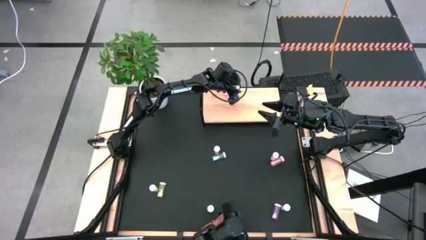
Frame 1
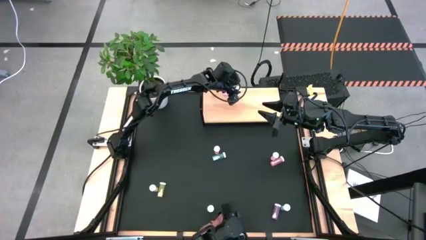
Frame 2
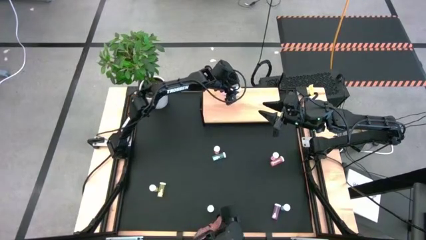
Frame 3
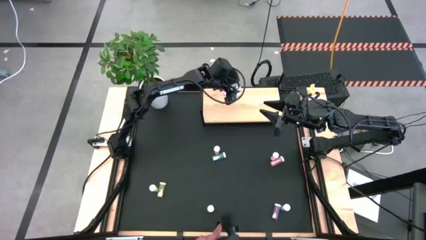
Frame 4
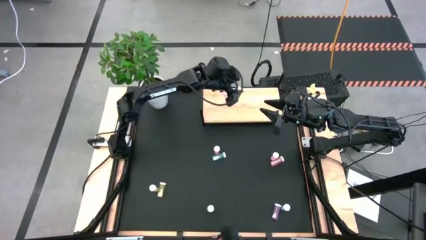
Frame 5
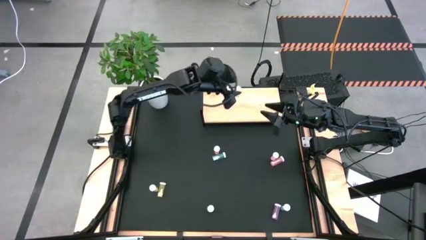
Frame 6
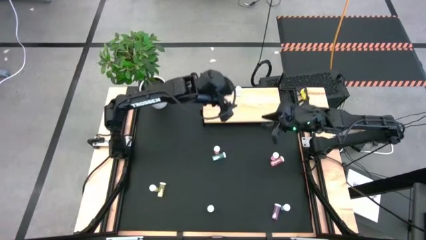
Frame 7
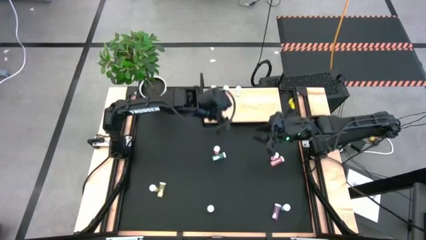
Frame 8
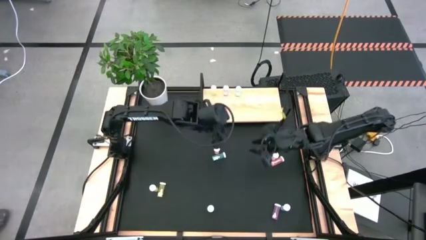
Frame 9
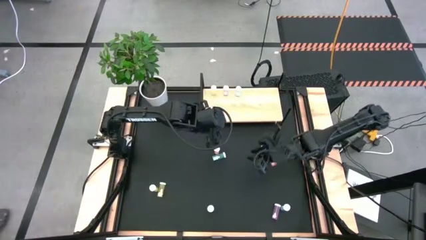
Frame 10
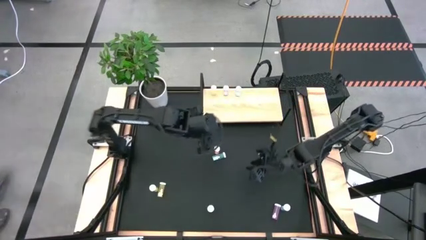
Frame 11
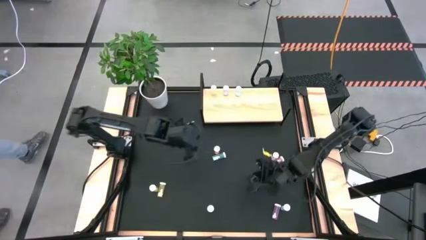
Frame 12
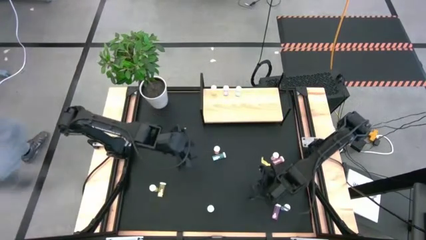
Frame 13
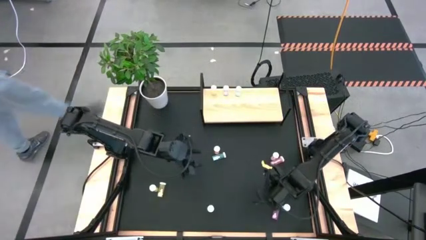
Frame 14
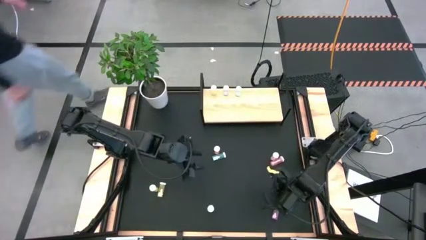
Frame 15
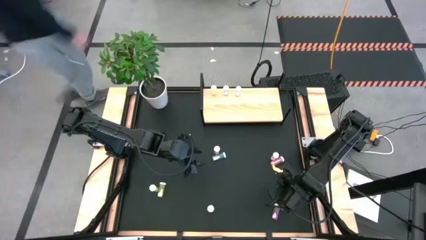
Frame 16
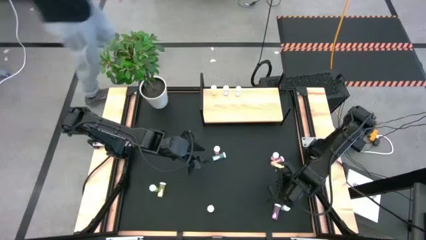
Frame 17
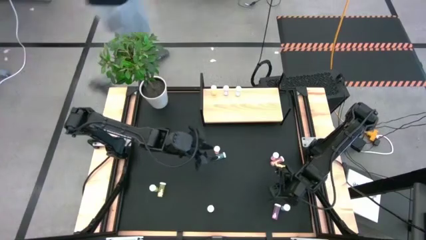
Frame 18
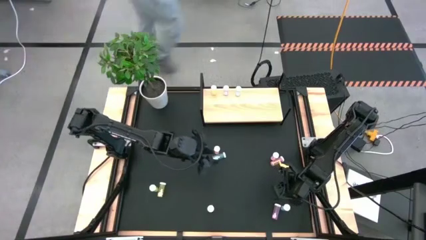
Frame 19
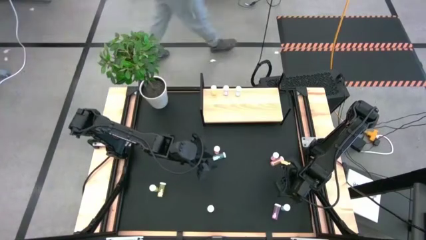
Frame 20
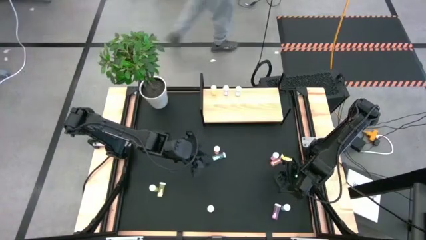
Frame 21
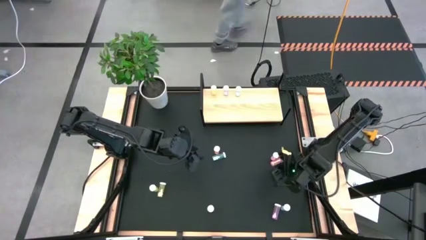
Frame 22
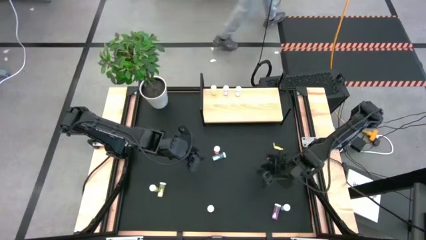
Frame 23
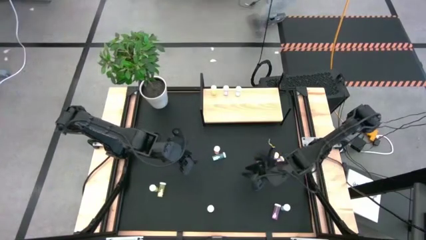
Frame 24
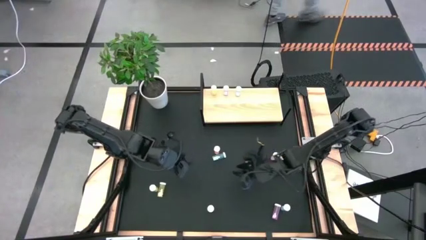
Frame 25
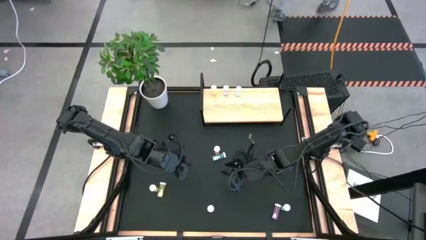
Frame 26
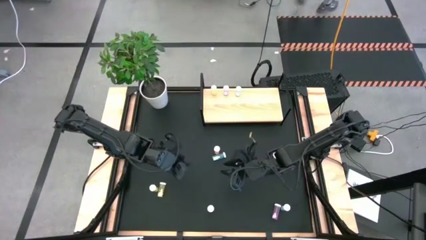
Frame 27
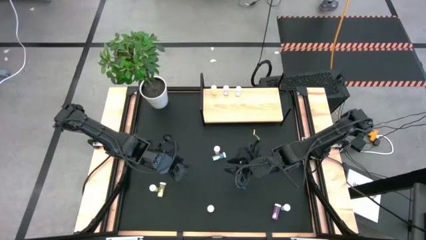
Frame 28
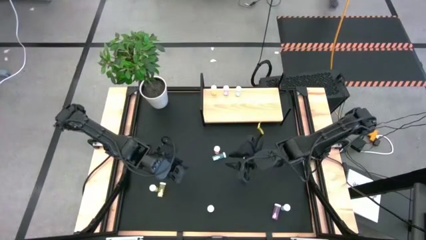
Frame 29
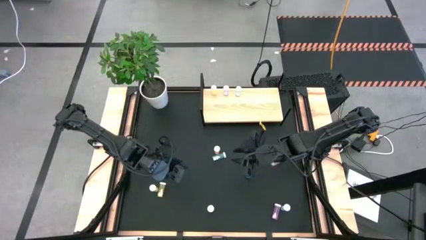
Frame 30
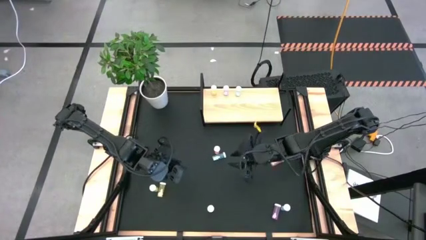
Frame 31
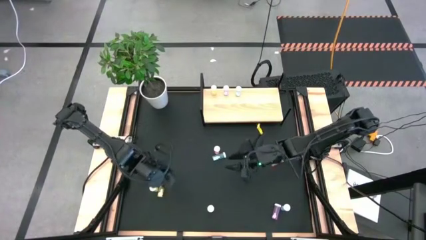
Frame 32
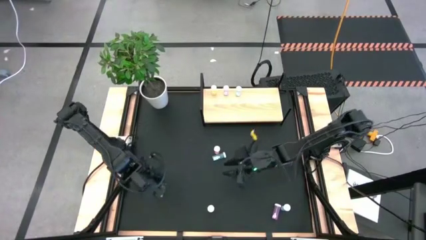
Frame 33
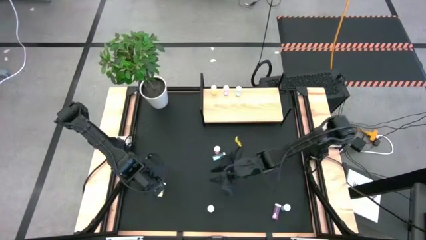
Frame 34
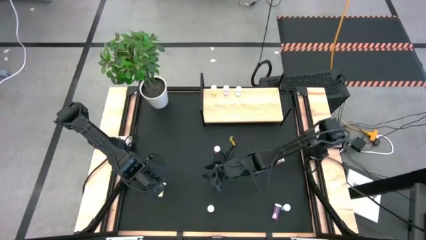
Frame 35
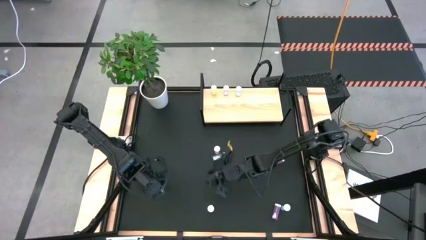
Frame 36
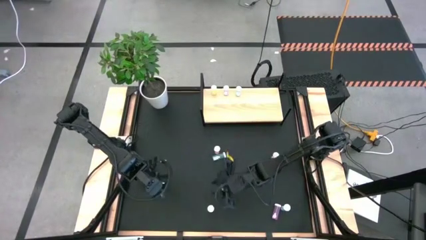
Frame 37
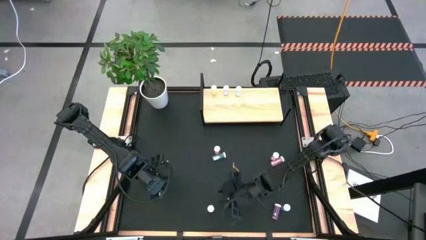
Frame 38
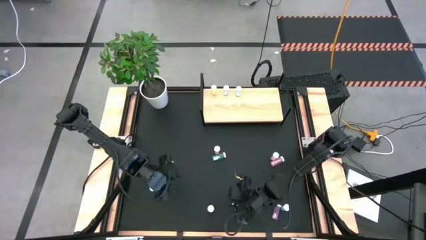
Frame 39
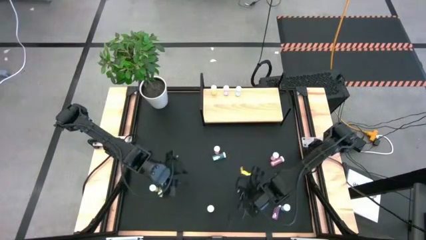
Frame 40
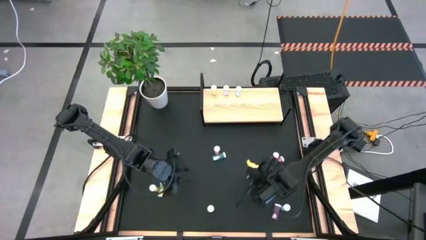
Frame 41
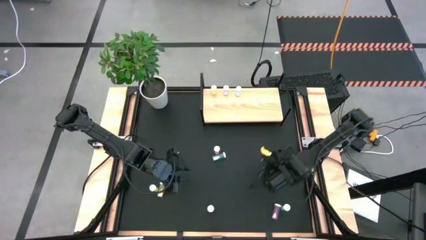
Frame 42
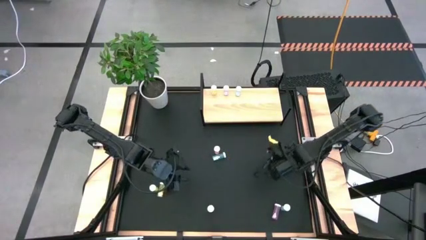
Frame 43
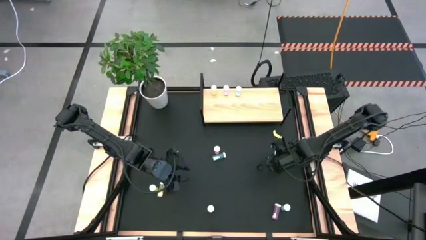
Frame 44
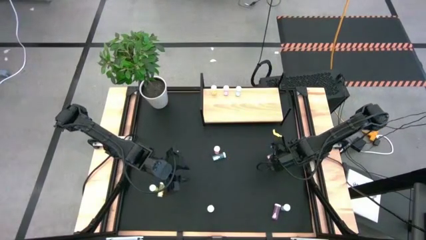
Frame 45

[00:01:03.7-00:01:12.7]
Task: Pick and place medicine bottles onto shelf by color
Put the top pink pill bottle on the shelf aligned with the other pink pill bottle

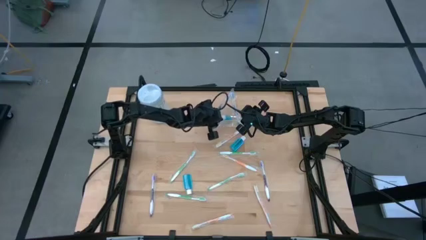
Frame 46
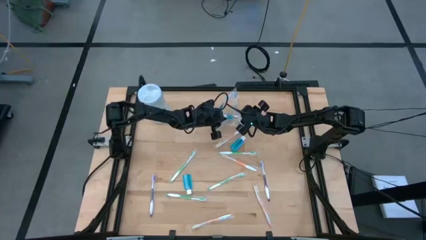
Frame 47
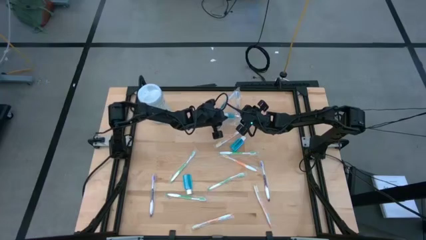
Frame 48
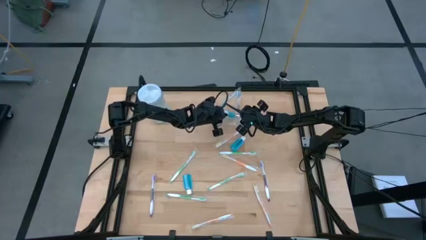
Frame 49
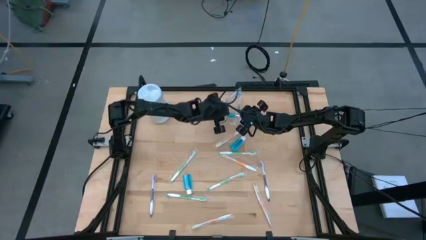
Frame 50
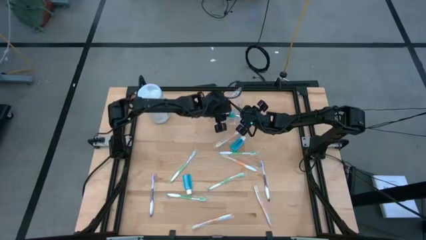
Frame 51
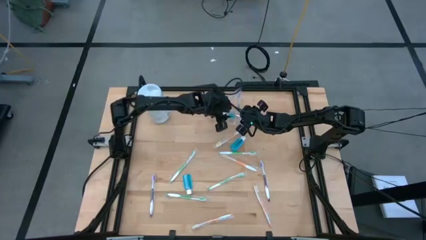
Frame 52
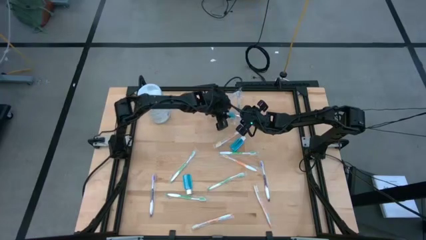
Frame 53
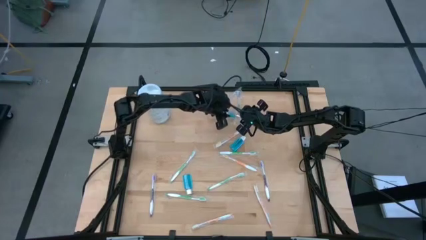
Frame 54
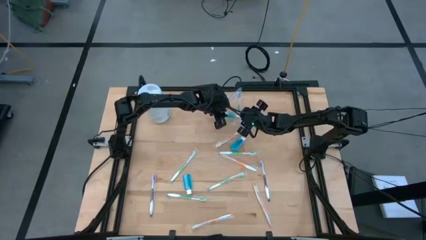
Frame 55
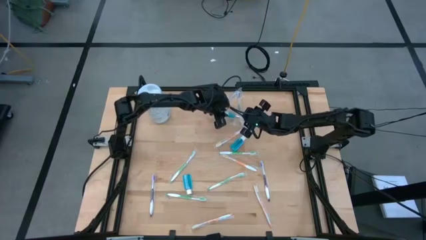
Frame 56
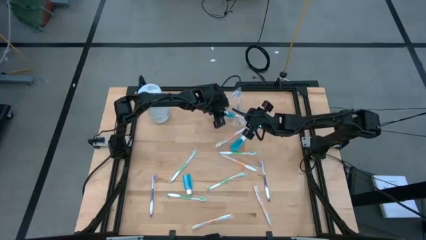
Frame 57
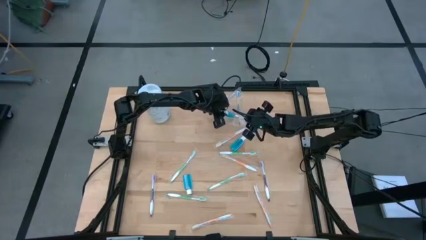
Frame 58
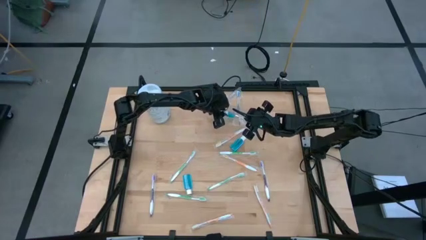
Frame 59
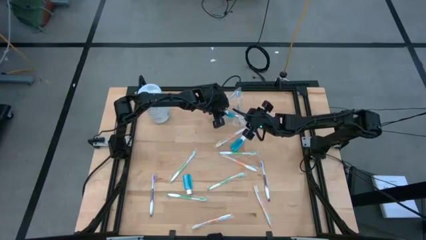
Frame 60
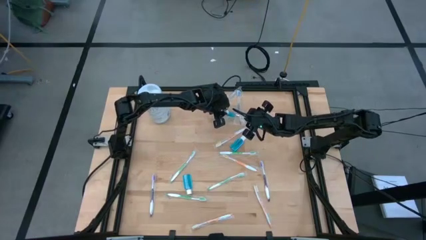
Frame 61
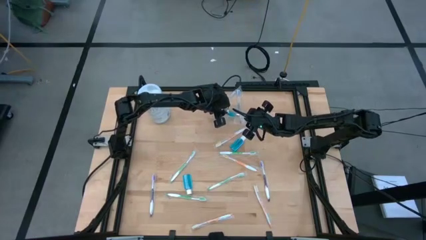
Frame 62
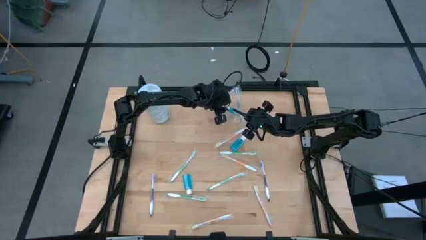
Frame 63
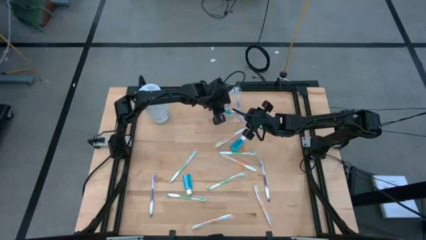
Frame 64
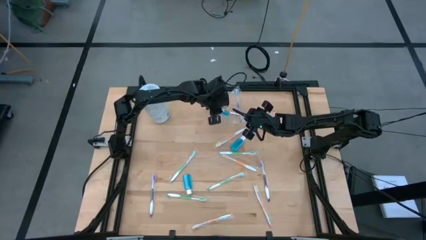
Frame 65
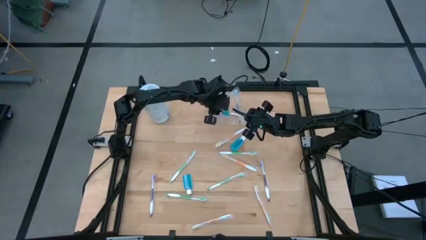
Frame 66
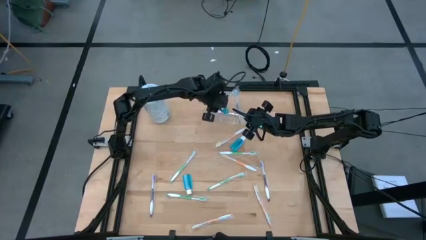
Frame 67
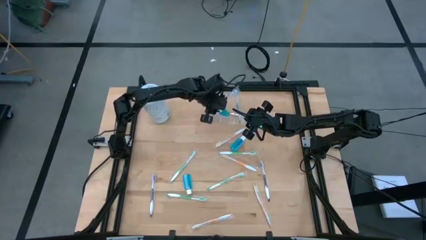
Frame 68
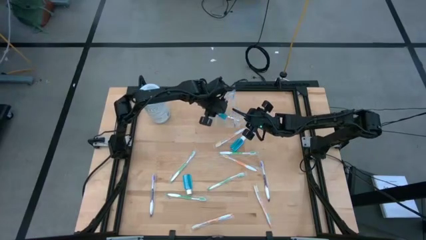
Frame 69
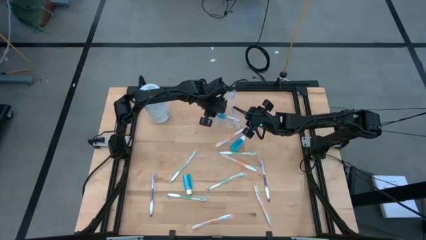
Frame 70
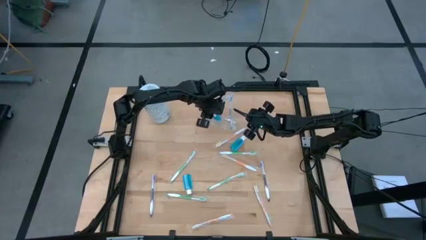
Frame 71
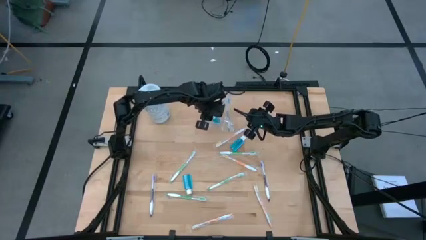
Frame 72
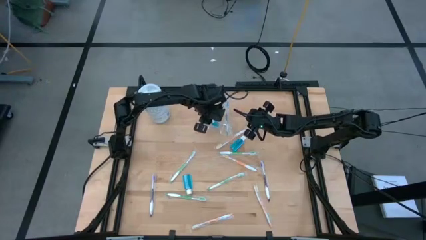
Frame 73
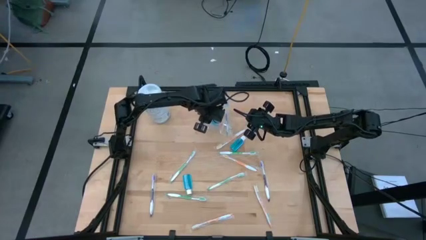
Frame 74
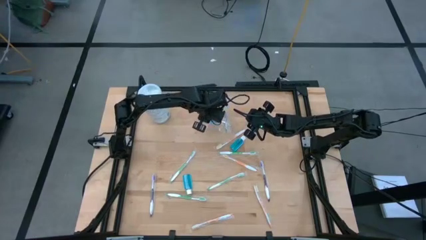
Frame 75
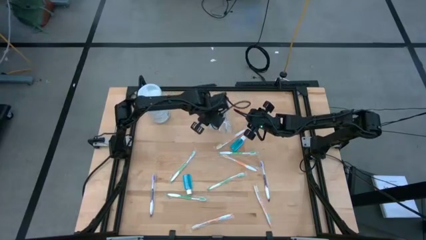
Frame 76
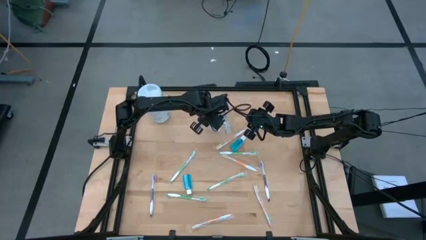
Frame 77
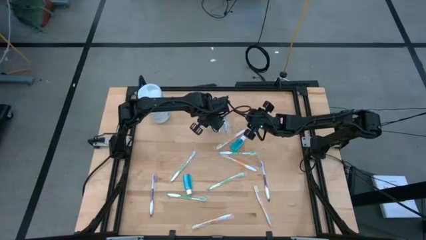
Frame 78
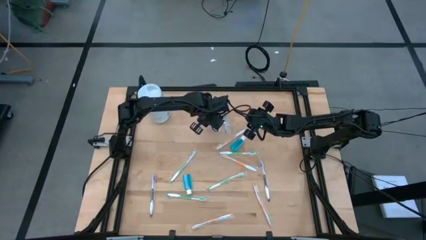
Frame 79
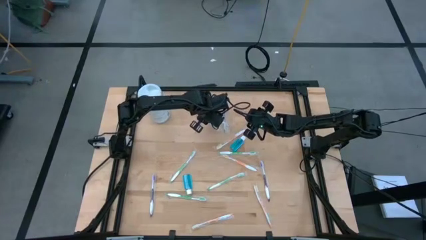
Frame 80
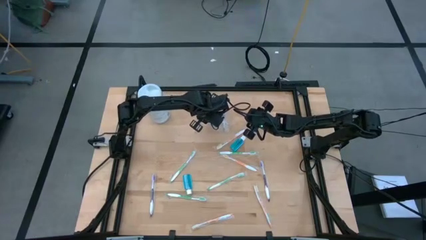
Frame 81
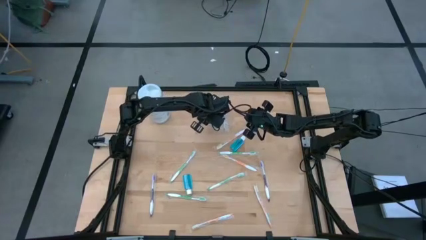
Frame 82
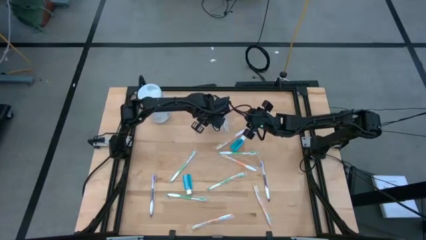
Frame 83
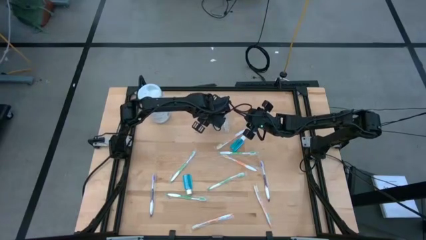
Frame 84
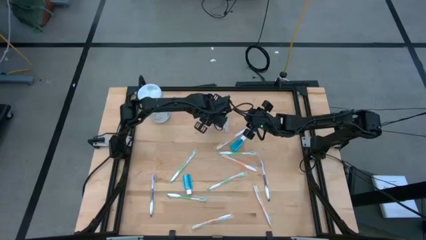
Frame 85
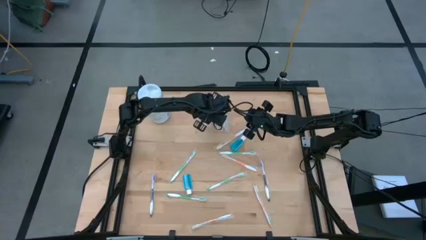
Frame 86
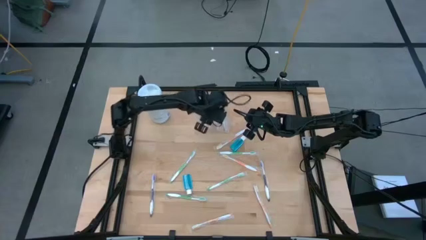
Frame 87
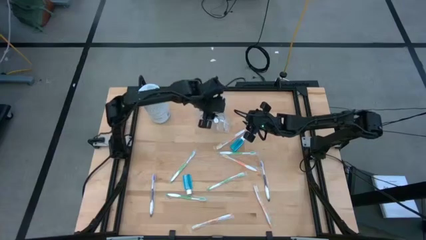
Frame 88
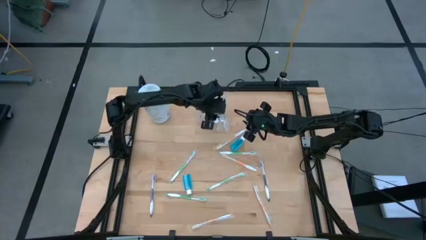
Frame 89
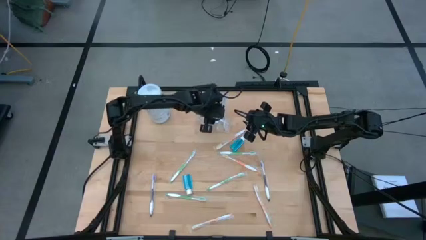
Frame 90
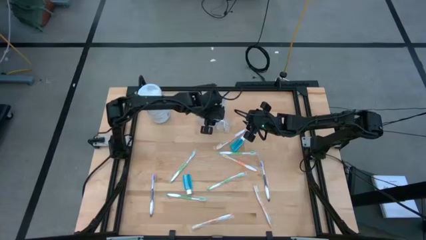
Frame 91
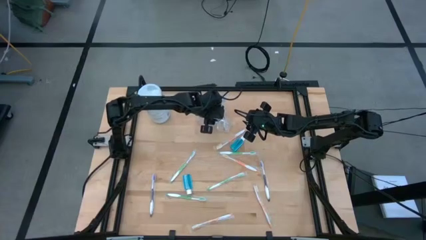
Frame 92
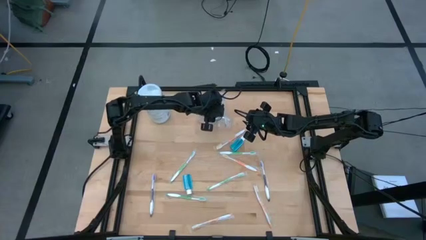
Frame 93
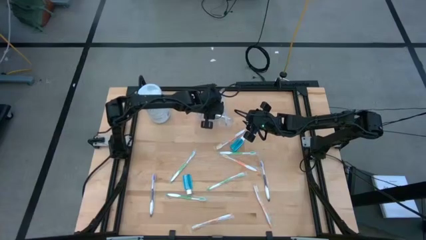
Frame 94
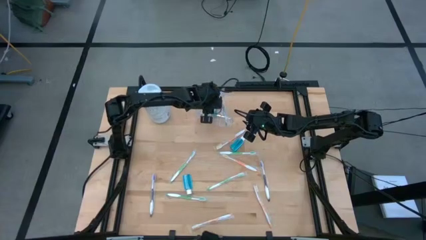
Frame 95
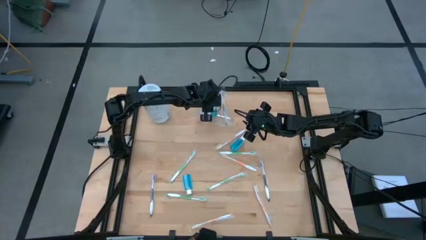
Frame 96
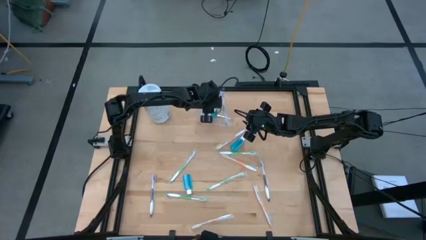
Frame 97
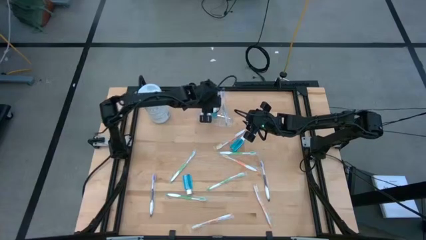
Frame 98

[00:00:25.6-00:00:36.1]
Task: Pick & Place toothbrushing station
Put the mouthwash into the transparent organizer
